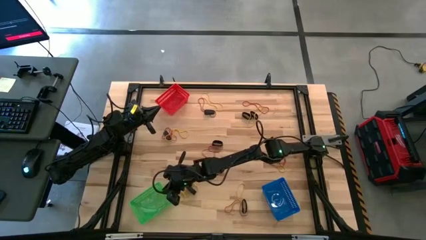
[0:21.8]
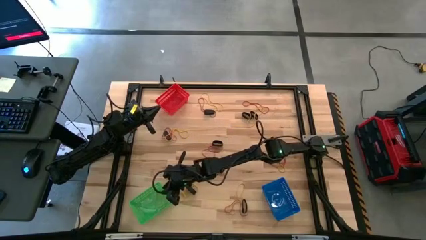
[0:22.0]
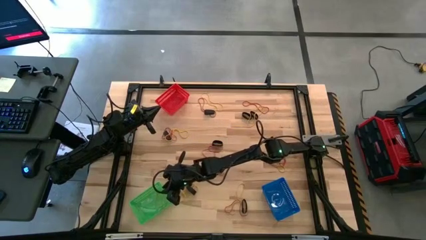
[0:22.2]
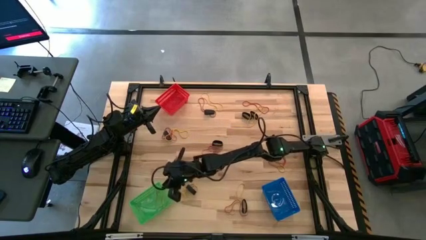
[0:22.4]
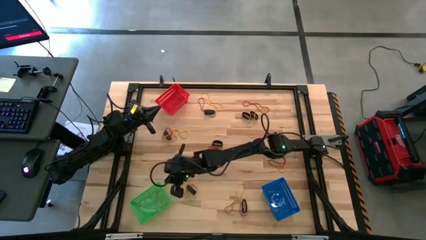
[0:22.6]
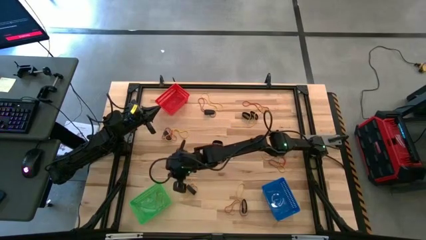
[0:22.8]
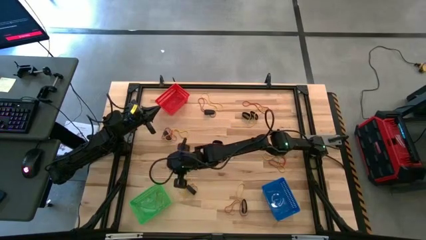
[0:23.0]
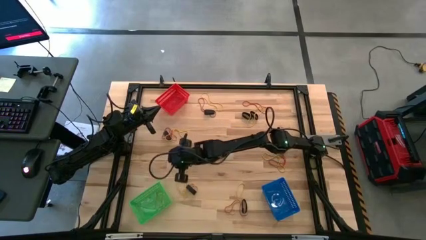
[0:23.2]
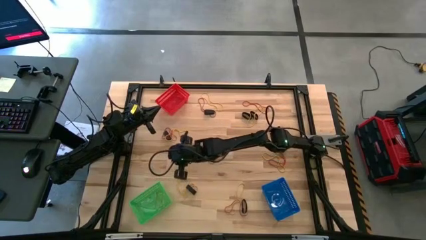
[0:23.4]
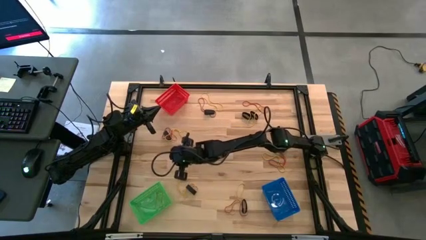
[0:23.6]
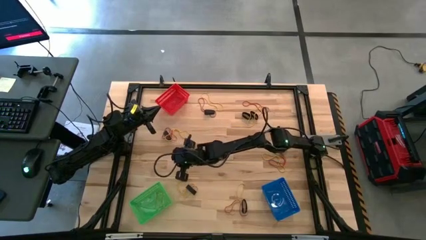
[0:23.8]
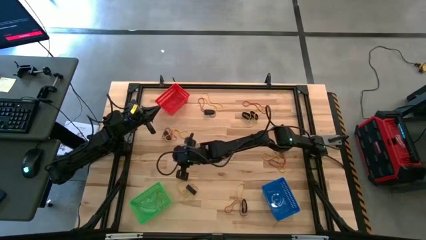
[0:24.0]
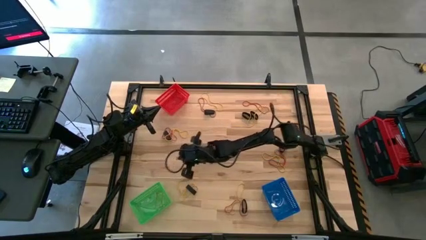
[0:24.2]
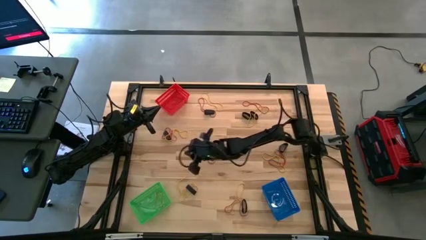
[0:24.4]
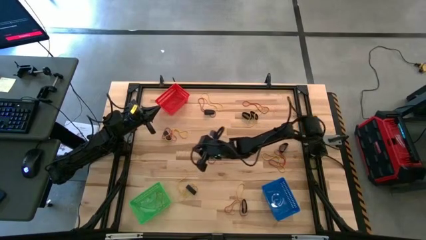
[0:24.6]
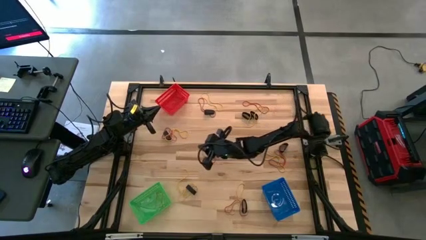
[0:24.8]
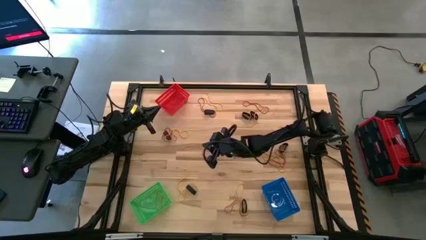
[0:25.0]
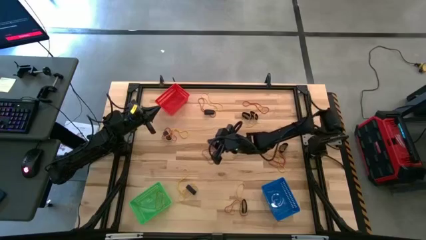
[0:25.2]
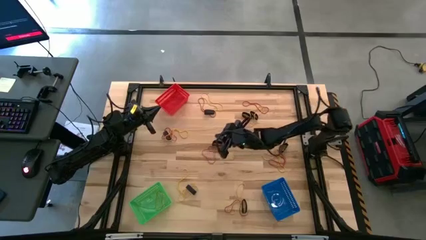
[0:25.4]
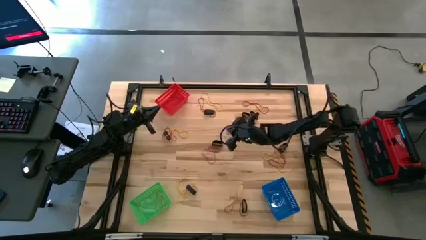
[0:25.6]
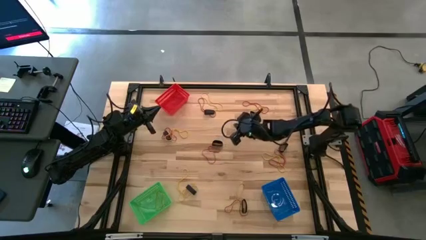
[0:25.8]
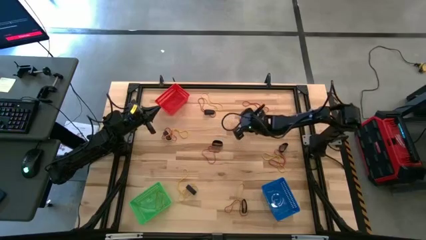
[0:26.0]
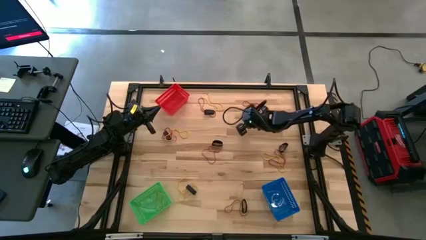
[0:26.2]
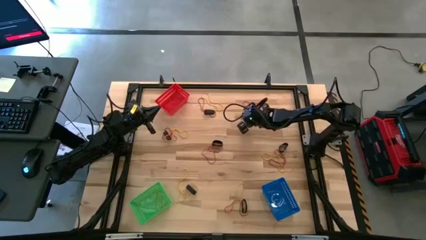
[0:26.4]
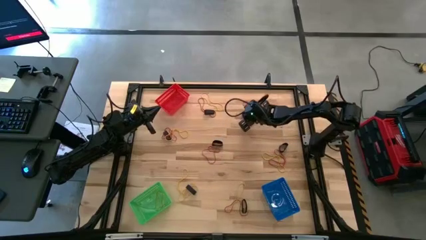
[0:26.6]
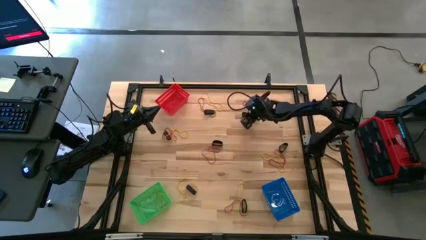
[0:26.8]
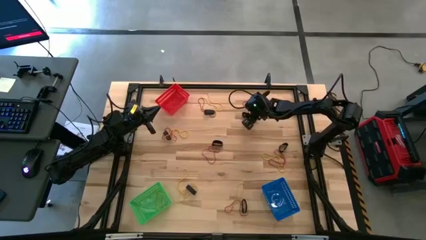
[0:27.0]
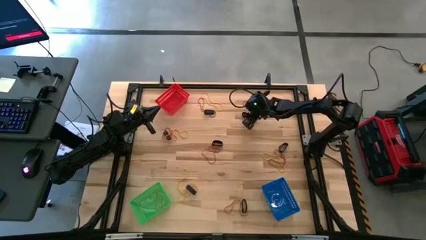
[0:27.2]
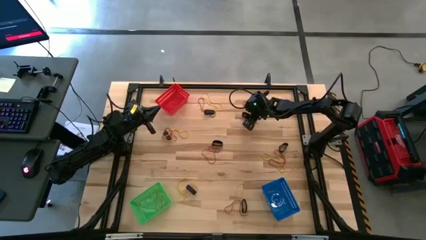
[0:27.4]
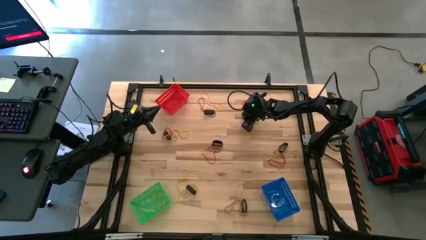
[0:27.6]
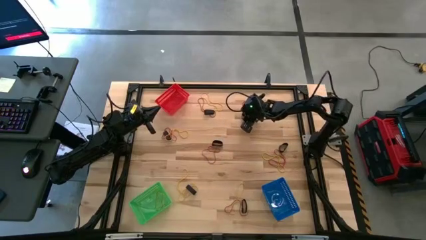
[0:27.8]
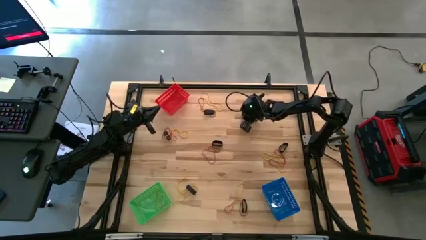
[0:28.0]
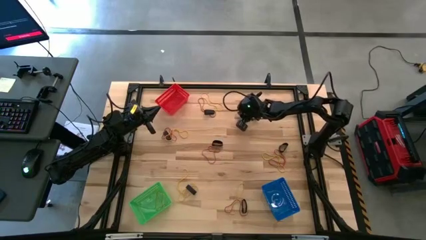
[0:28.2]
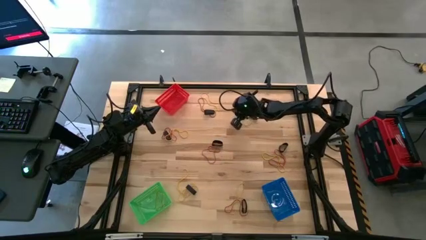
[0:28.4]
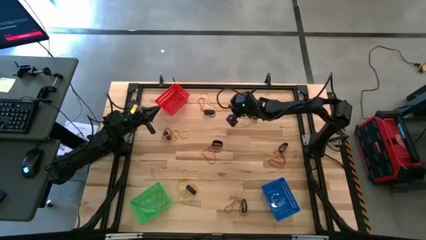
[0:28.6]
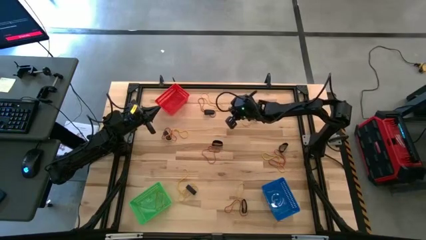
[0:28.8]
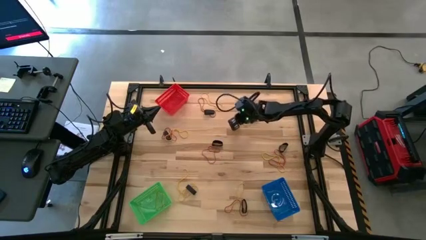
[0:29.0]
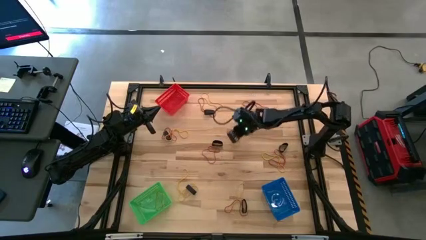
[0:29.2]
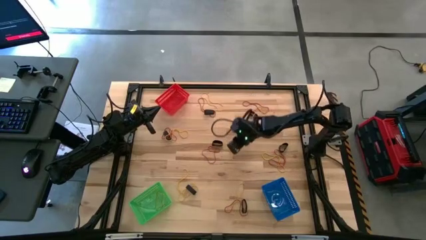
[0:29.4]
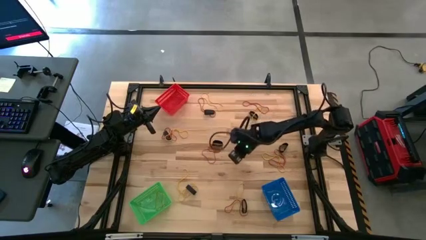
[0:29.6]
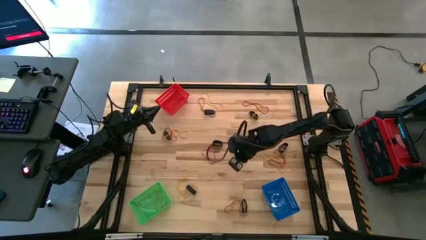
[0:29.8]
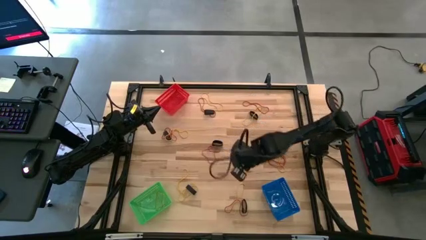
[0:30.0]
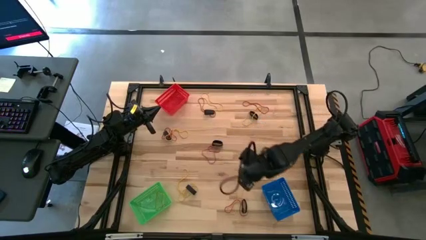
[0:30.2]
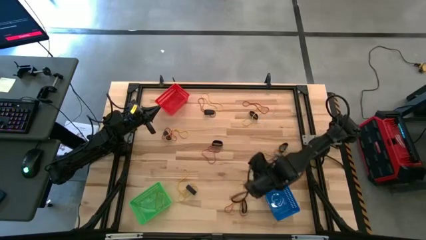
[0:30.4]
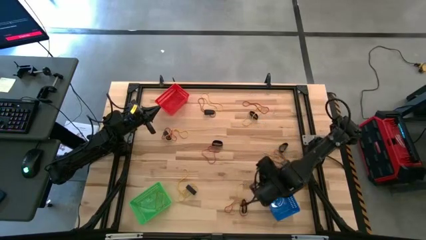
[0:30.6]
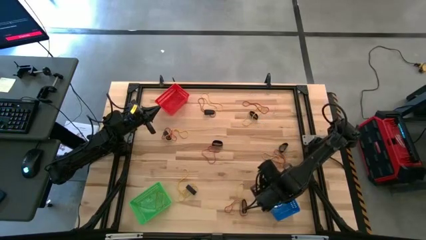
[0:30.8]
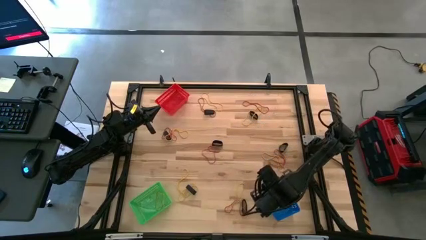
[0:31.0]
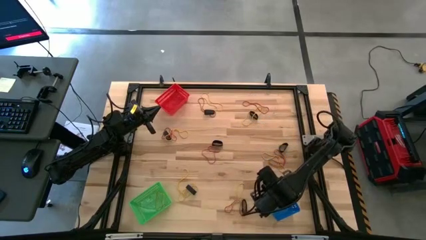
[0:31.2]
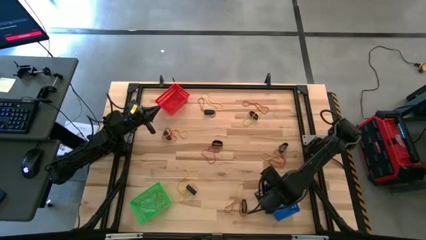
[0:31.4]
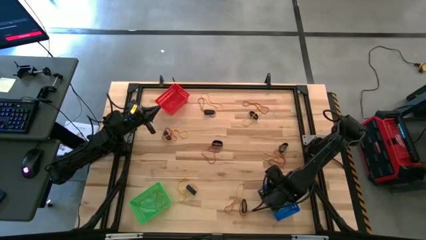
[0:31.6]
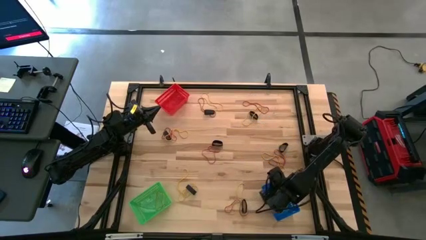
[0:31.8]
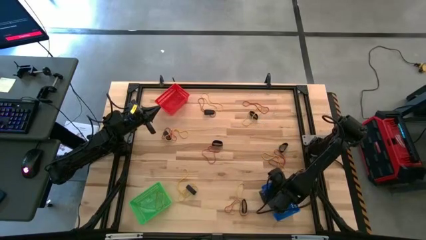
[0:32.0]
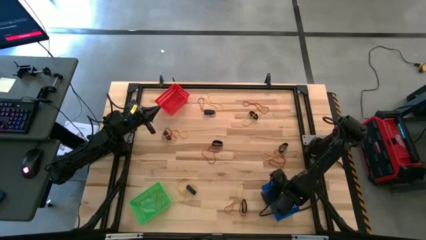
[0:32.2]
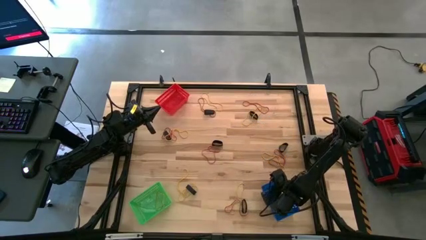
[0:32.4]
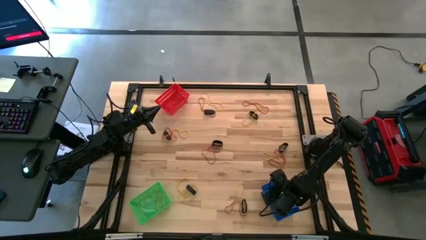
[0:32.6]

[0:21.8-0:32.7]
Task: Sort rubber bands into baskets
Put the black rubber band into the blue basket
